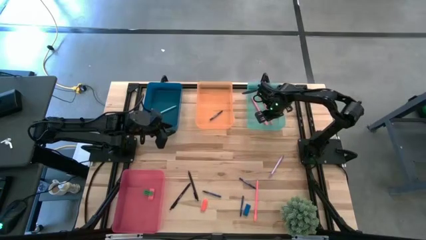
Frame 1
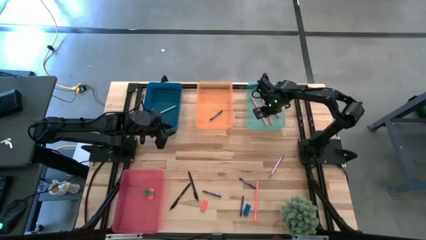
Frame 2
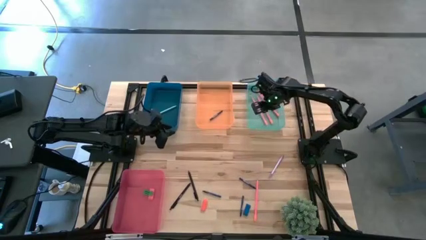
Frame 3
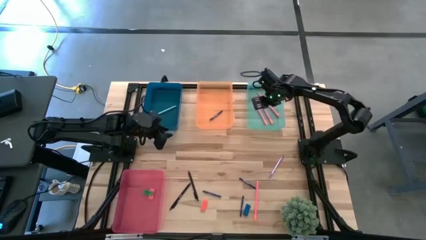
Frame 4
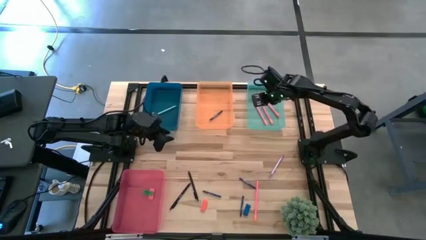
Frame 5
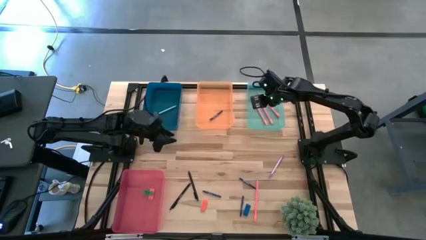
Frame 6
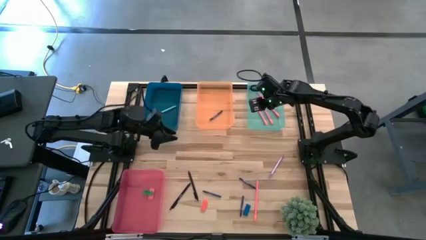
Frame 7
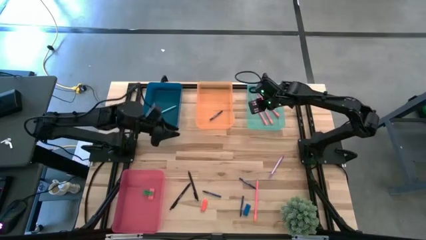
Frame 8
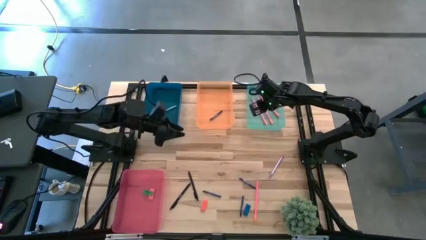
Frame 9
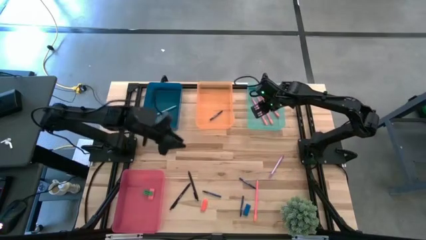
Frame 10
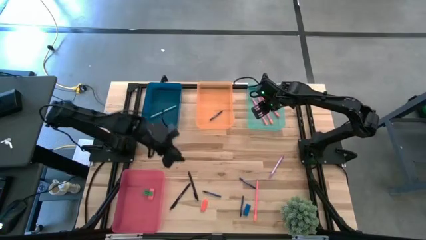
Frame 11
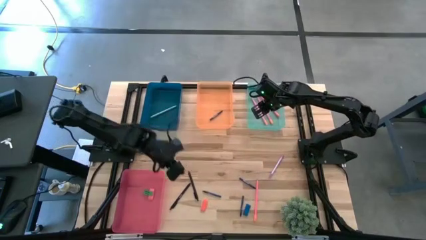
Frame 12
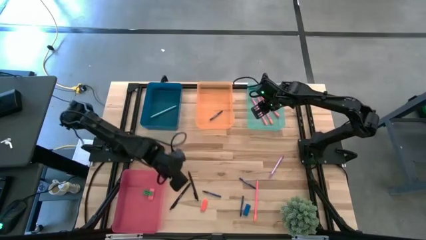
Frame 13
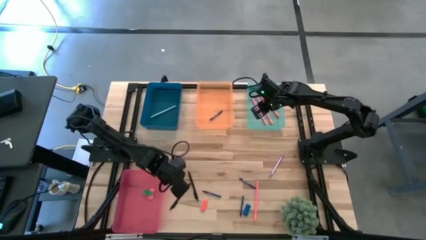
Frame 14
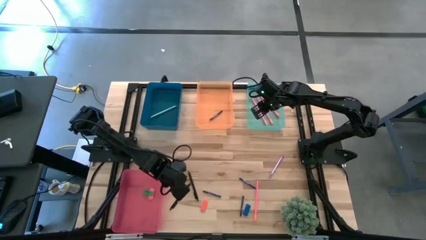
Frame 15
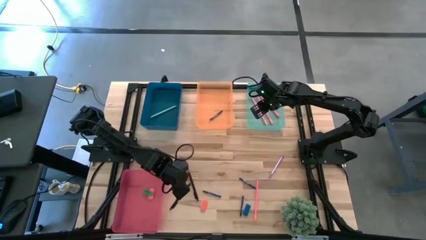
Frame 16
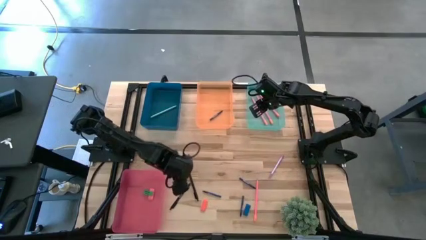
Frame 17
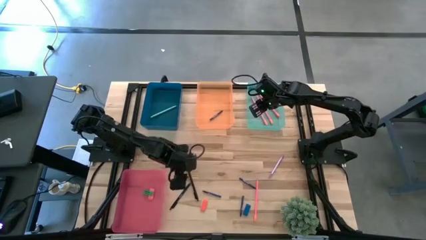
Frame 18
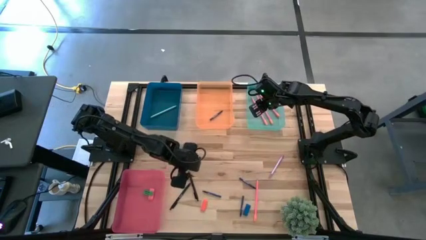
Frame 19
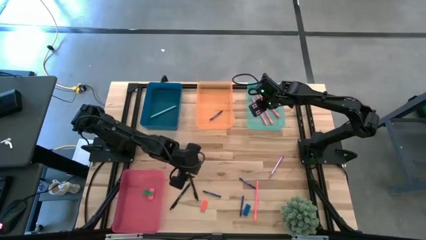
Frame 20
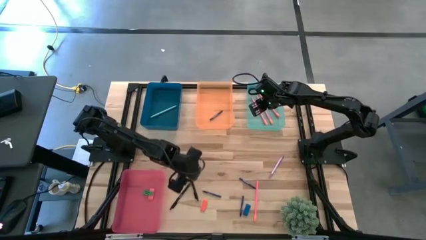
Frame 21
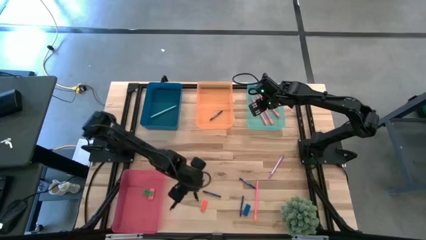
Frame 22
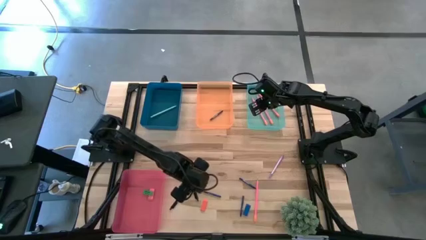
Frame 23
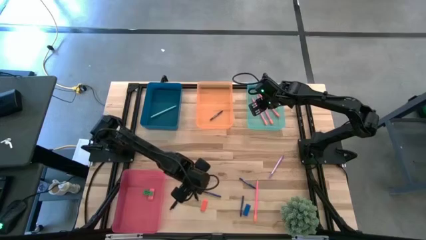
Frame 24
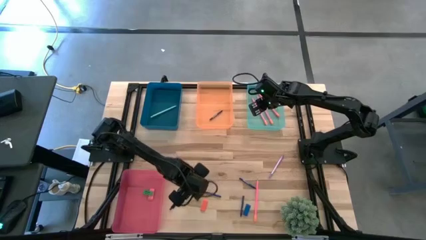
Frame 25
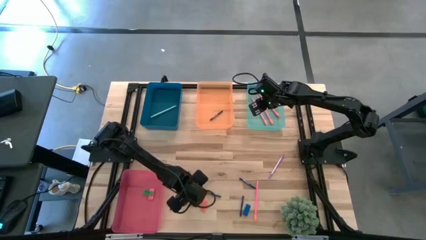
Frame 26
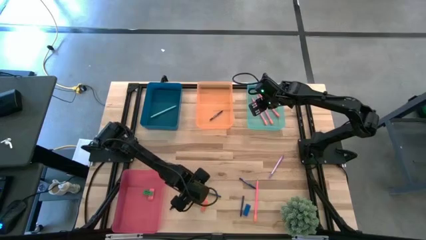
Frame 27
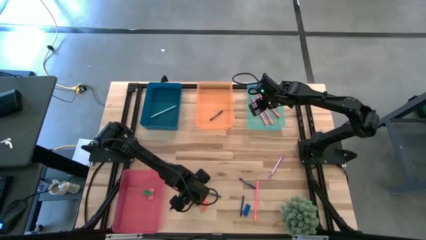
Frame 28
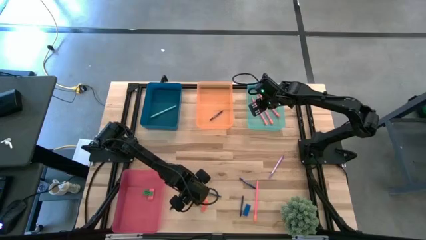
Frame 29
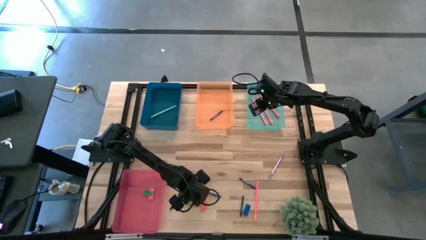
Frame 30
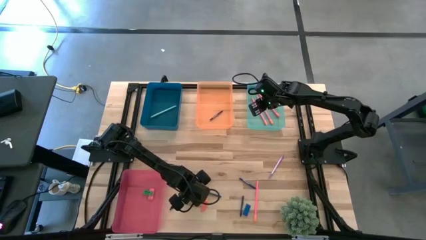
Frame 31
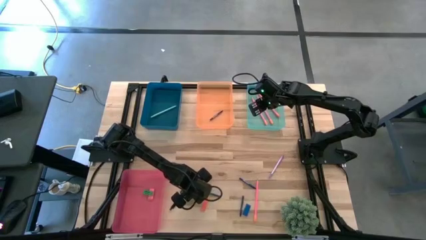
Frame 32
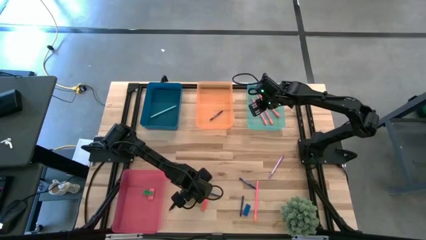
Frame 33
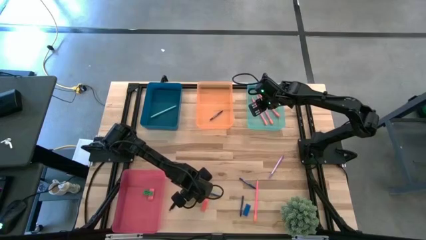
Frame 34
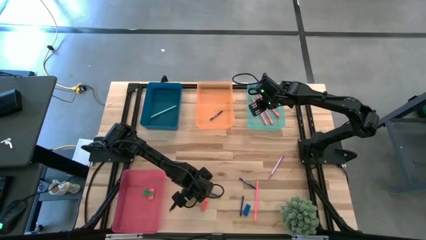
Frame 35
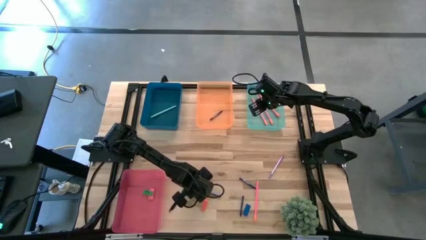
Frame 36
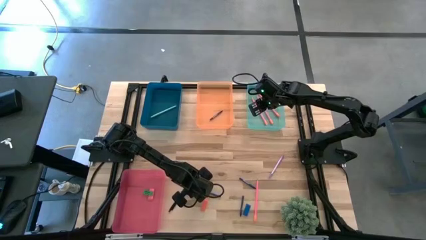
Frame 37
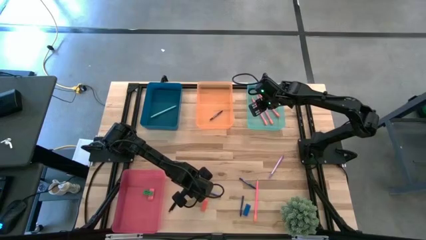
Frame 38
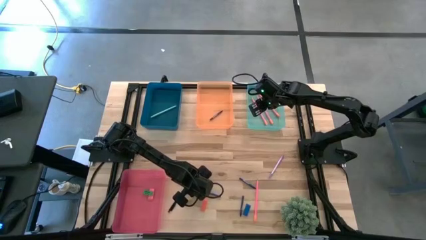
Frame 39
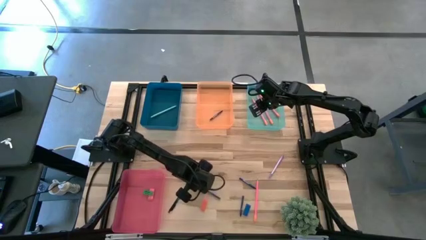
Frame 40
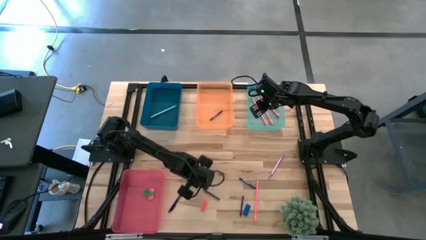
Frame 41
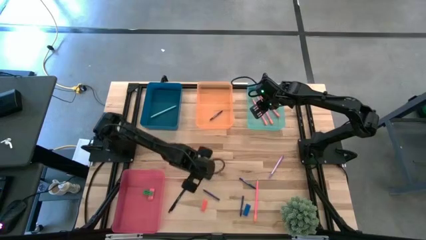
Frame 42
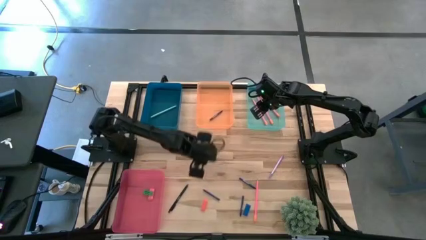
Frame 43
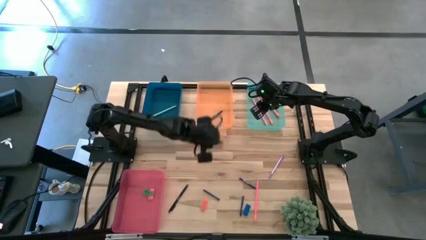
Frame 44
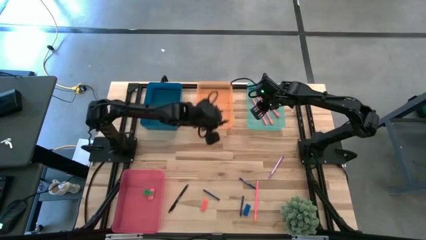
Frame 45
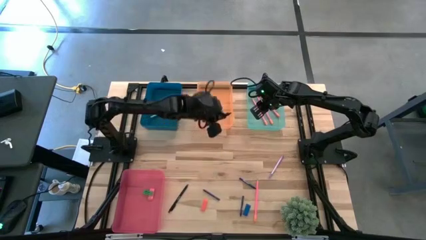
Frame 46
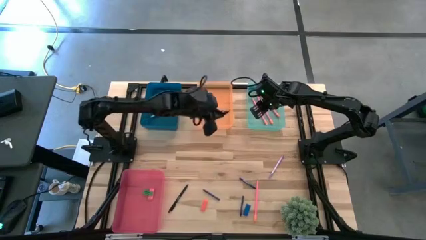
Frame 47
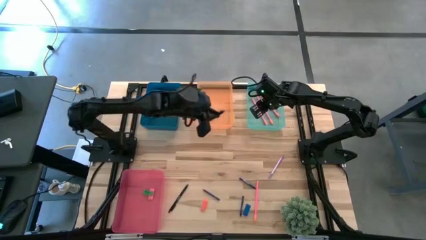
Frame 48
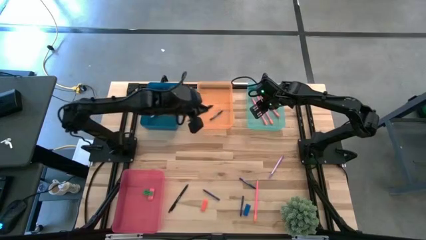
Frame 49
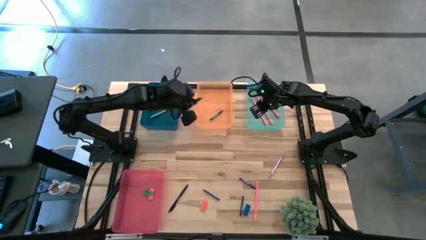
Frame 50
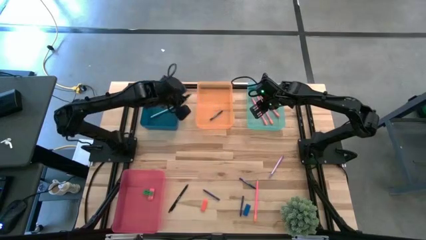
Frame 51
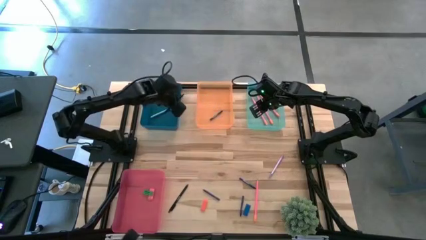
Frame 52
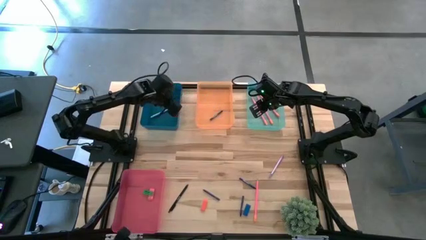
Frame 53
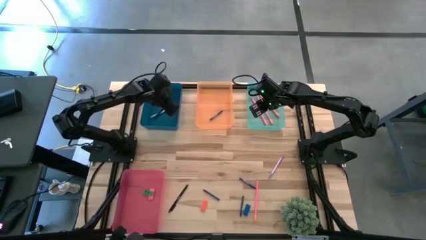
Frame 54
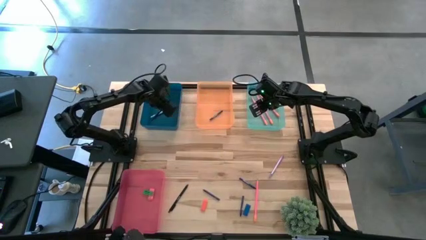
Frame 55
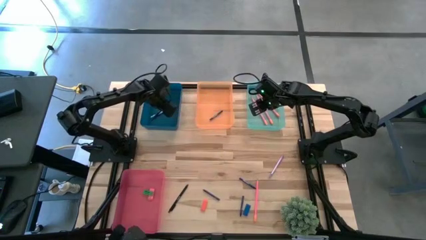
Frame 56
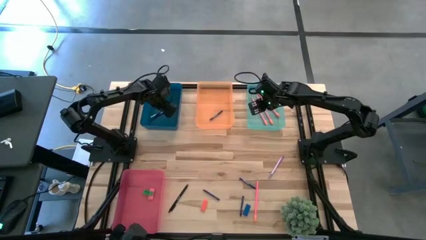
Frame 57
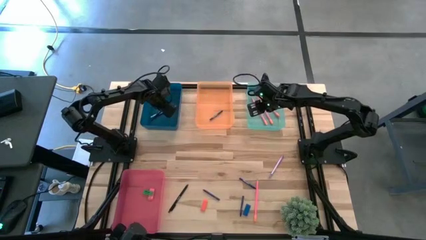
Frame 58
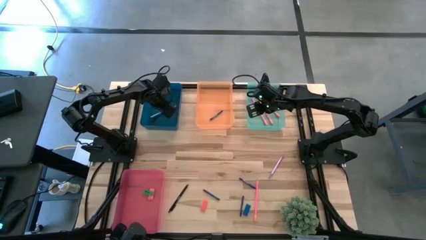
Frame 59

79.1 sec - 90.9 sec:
Task: Sort crayons/erasers/pens/pencils in bins
Put the black pen into the blue bin
